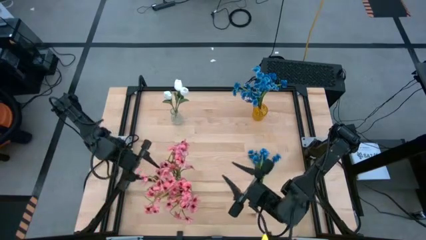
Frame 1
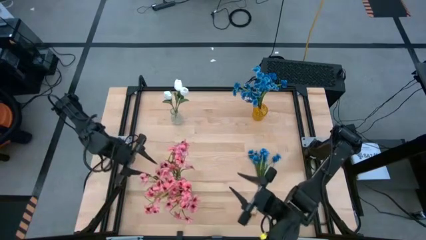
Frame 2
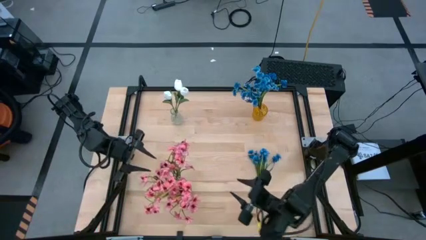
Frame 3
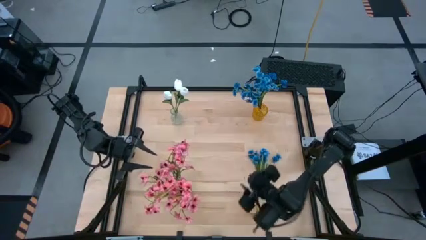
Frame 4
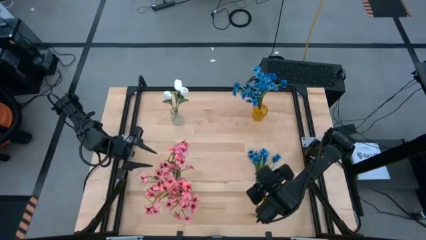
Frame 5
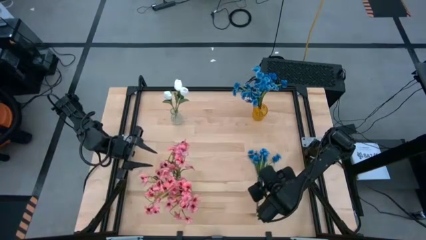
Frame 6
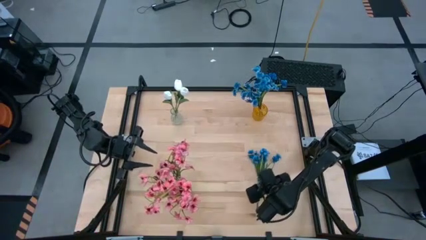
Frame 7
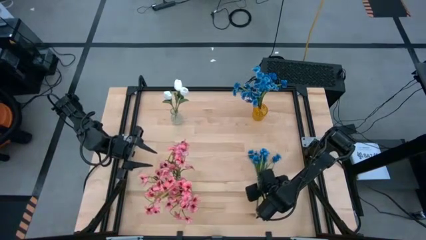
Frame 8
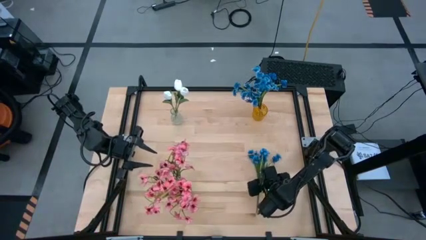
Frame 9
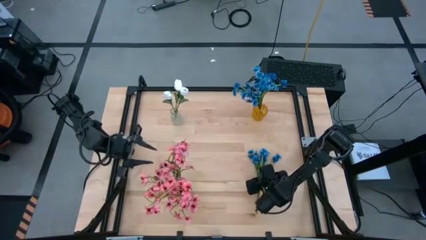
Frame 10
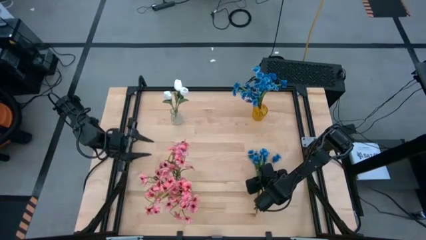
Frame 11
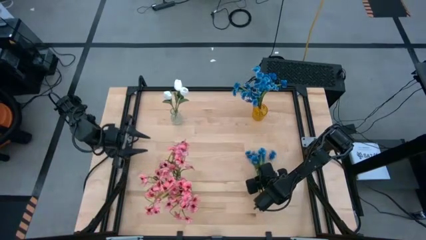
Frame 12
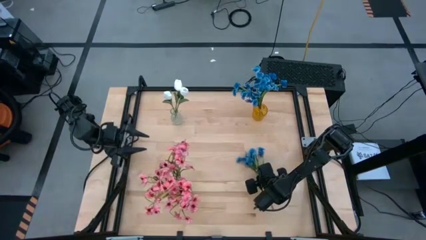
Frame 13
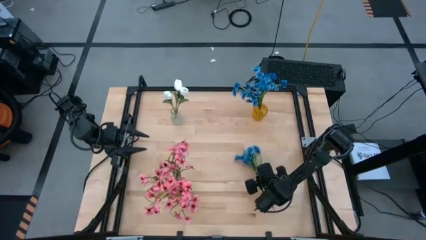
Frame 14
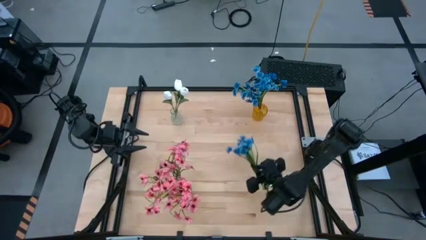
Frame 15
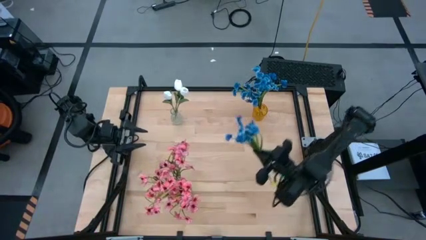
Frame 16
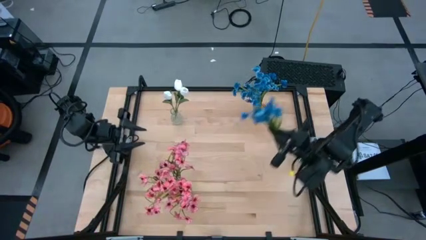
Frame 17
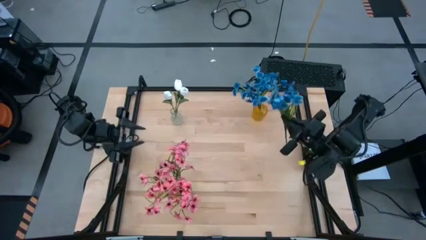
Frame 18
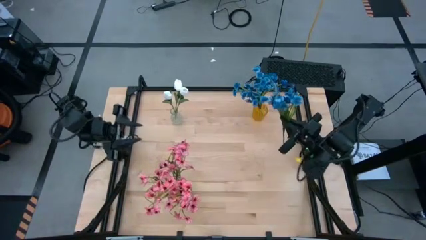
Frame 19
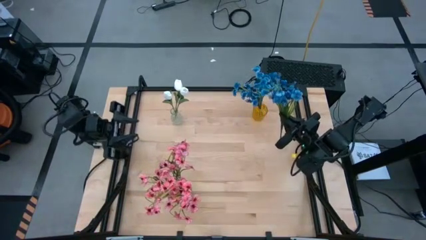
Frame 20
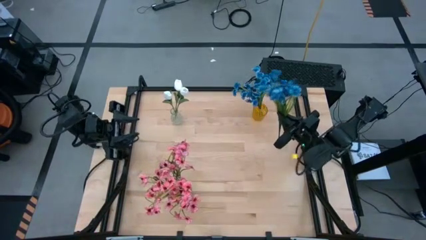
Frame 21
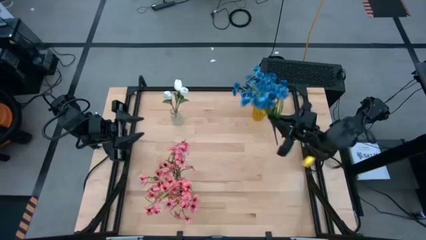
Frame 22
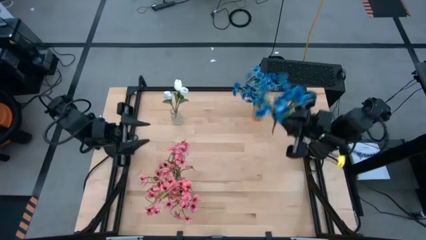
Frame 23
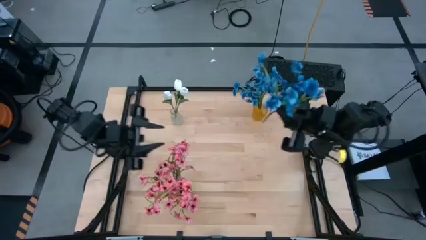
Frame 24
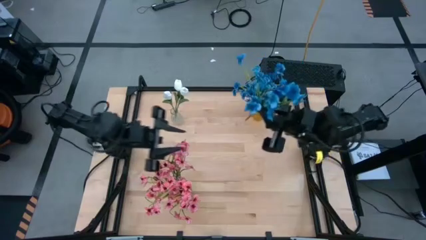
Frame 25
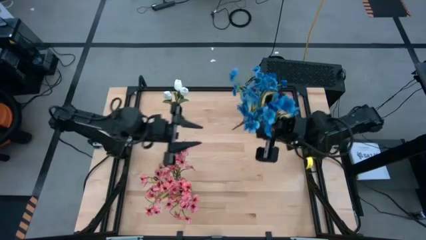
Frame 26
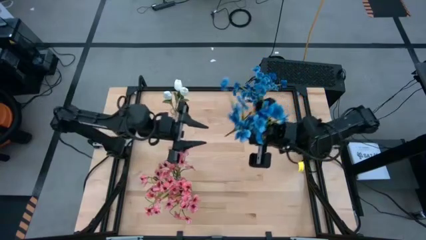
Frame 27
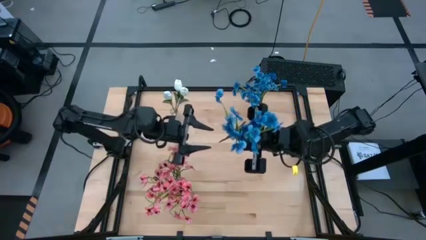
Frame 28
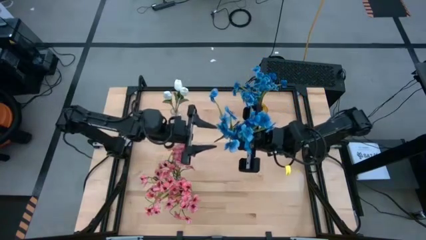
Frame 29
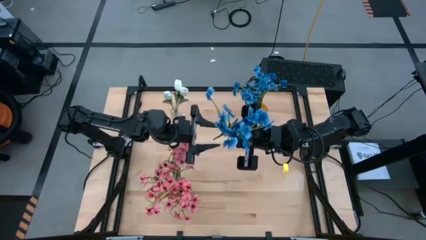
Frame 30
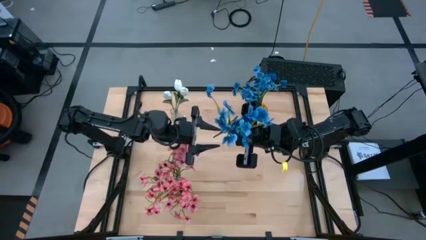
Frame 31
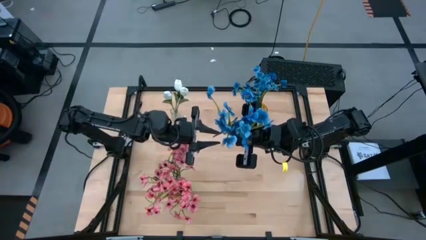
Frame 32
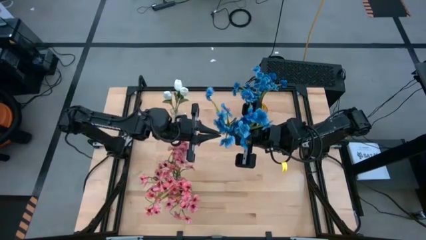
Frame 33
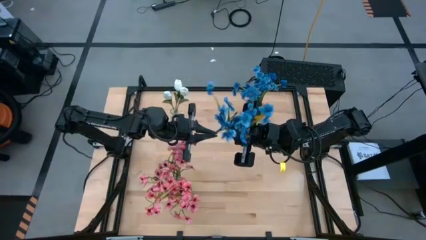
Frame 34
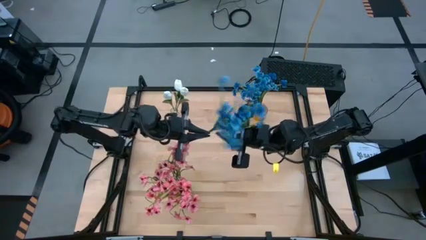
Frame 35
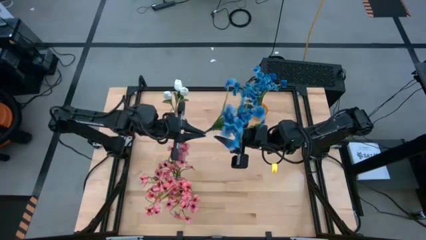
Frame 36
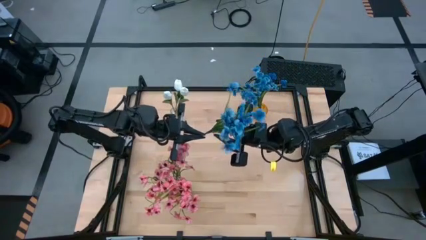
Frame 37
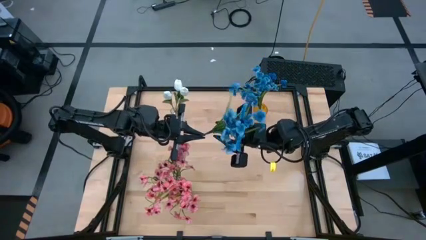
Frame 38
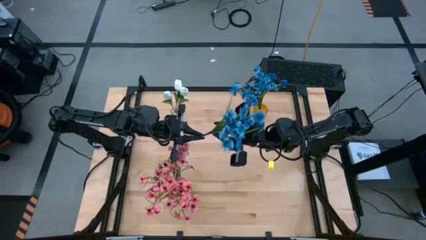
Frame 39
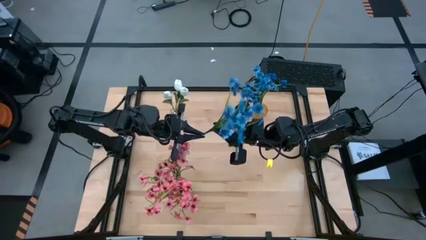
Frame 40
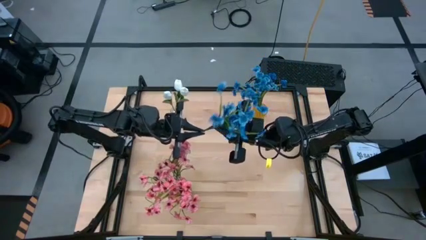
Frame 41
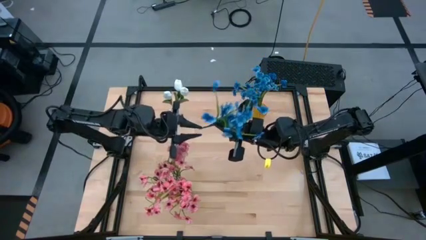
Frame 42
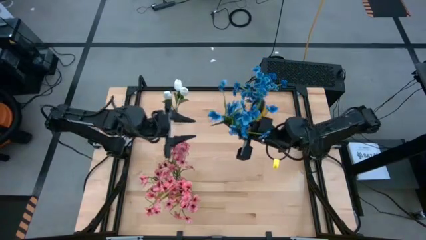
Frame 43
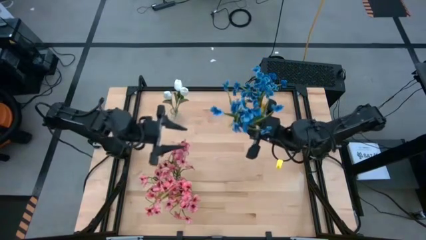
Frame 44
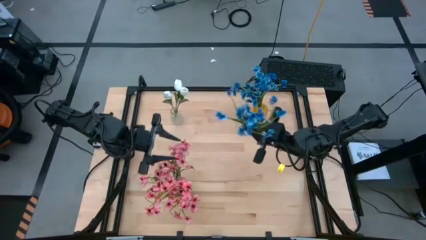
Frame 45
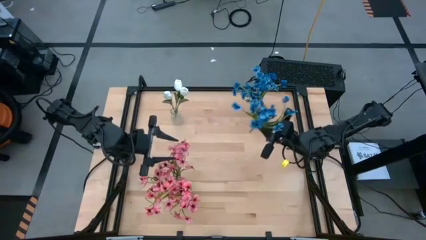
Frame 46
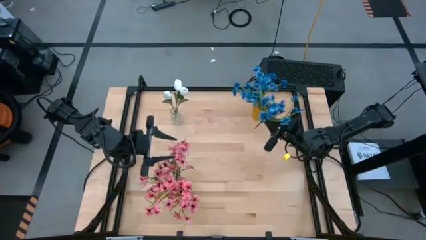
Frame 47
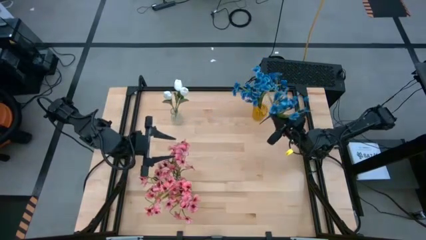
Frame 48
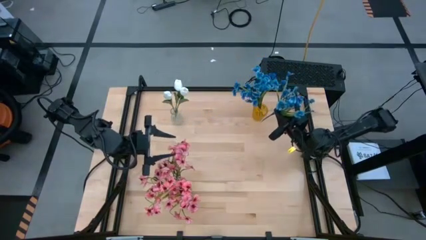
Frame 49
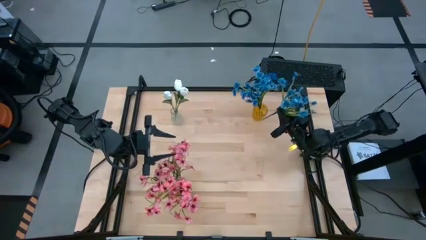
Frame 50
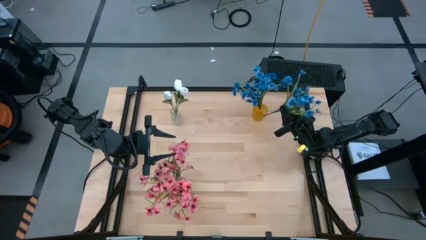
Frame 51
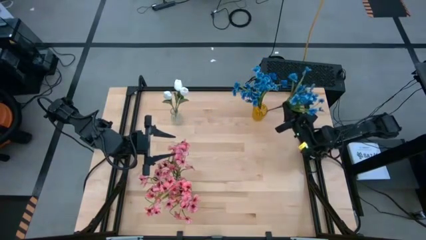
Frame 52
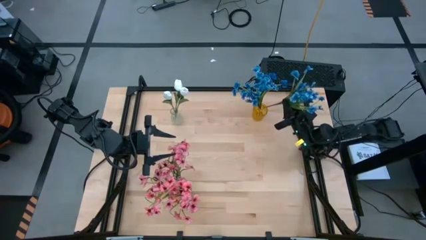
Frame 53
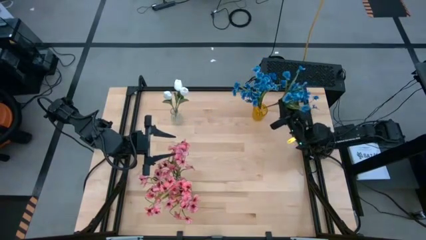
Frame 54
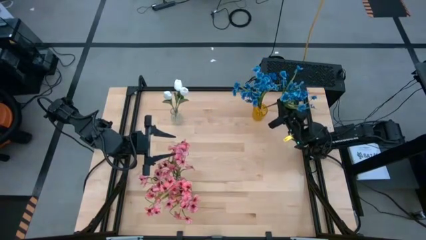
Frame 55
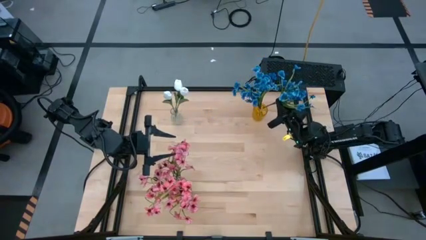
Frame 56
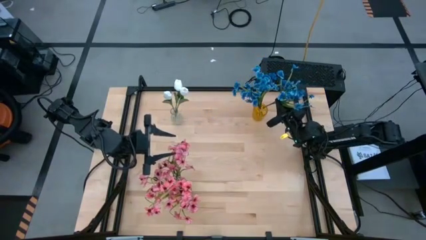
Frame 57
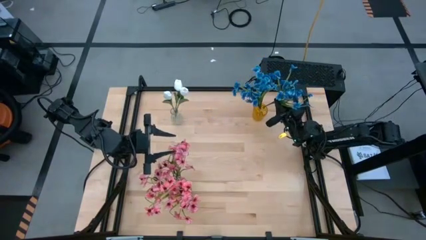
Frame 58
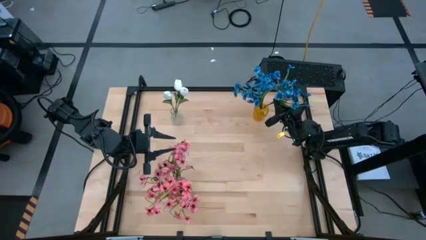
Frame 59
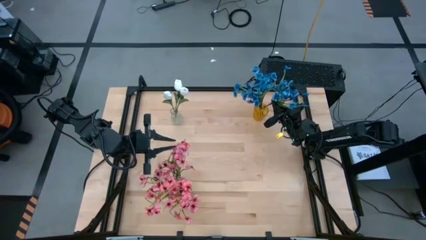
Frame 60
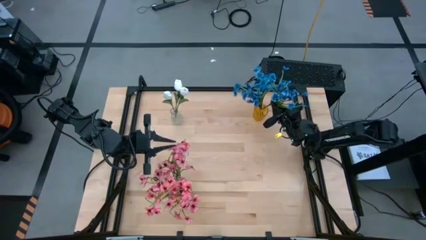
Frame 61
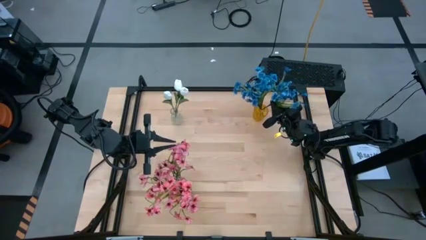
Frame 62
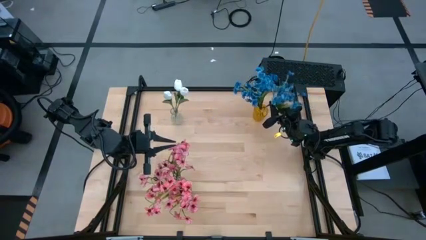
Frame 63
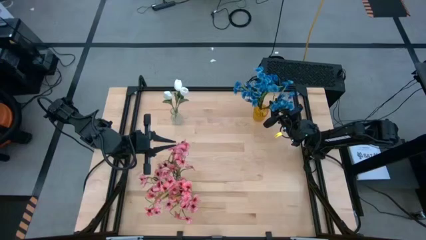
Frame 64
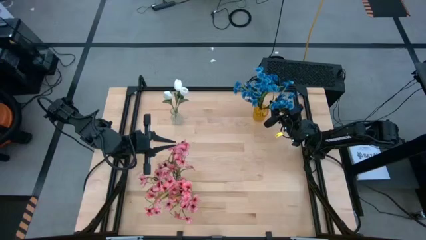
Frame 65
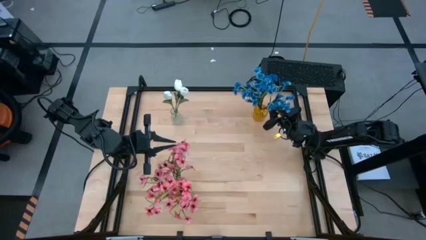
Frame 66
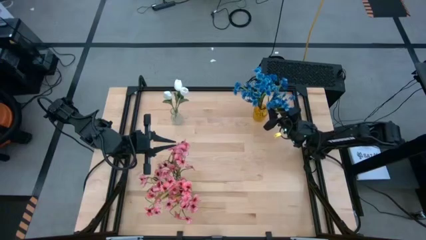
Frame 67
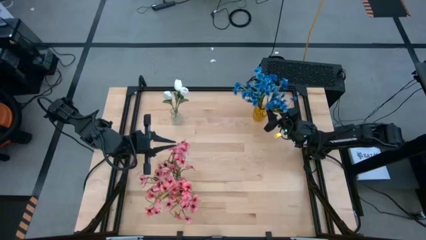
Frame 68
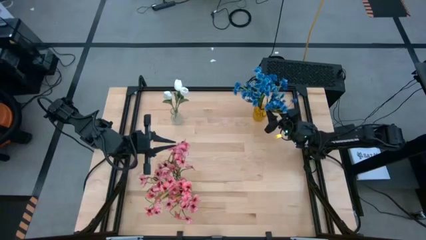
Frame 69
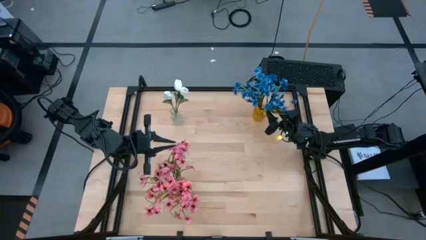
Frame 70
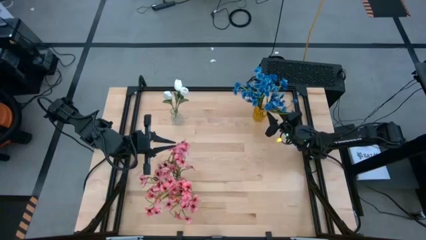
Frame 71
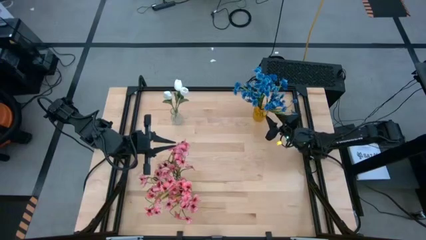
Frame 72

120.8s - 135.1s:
Task: Sort flowers into vase by color
Put the blue flowers into the yellow vase
